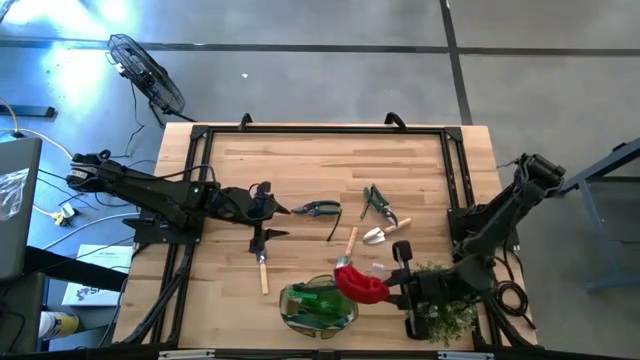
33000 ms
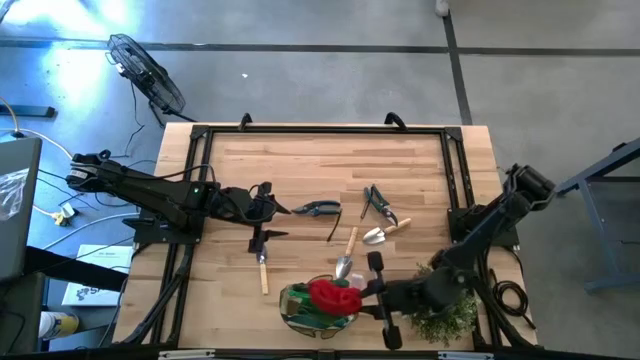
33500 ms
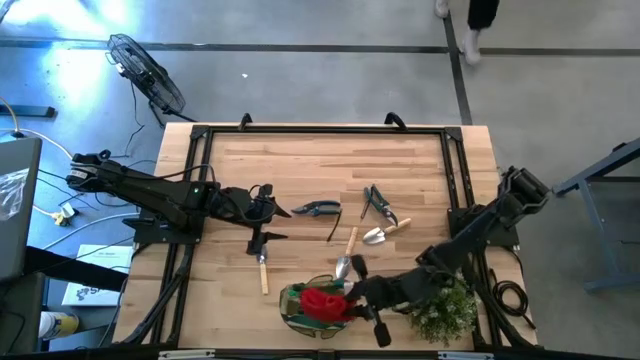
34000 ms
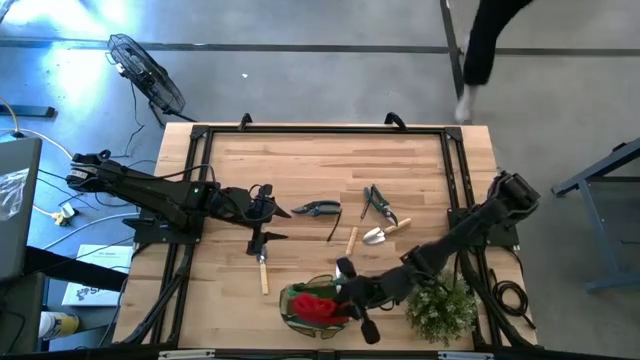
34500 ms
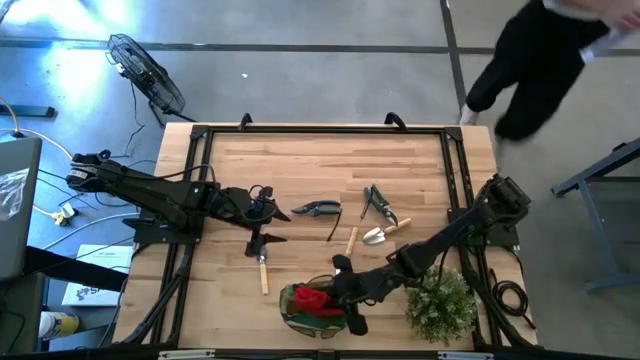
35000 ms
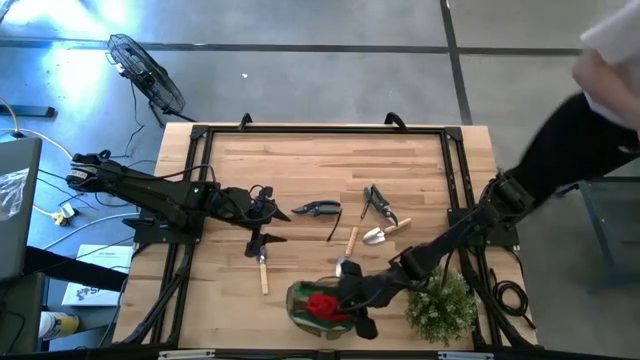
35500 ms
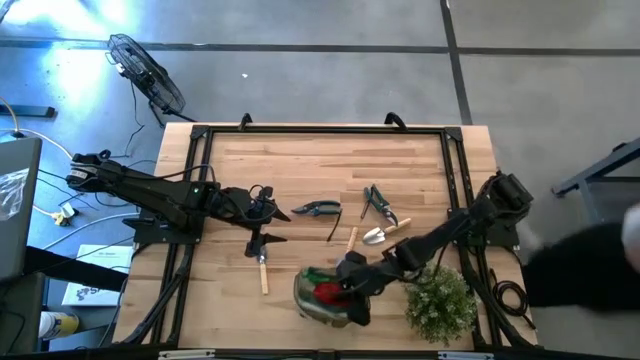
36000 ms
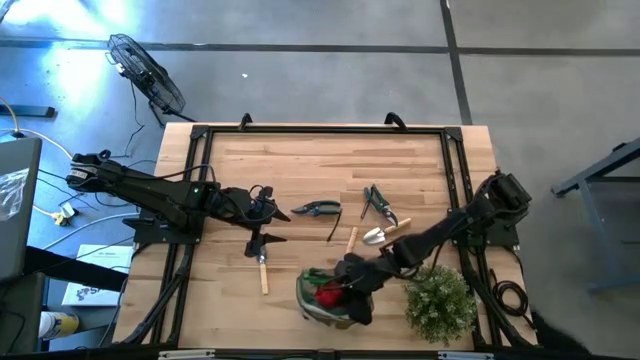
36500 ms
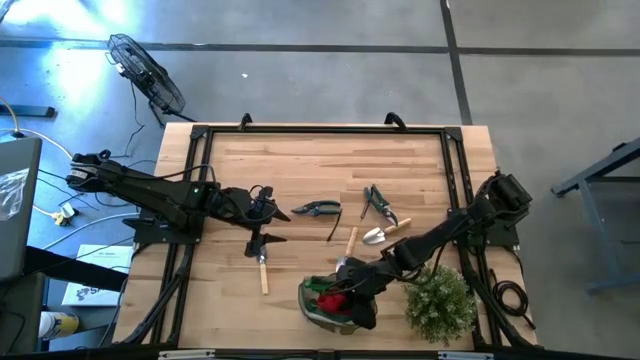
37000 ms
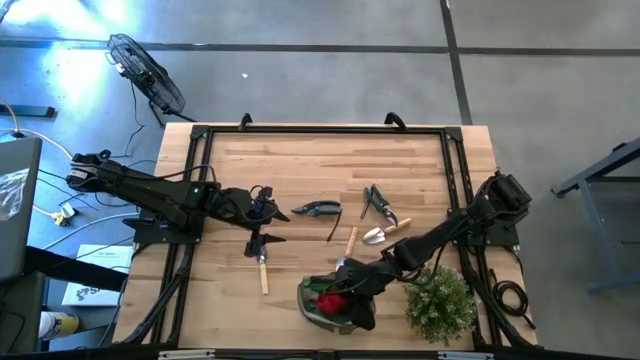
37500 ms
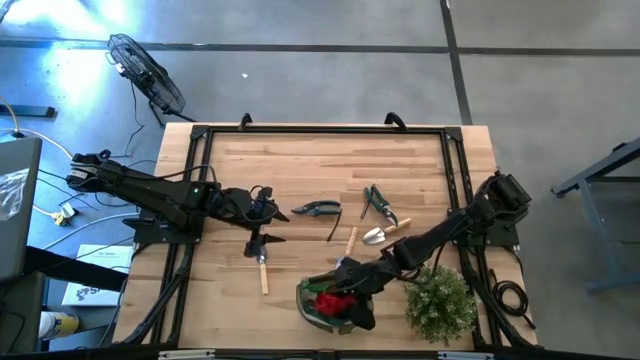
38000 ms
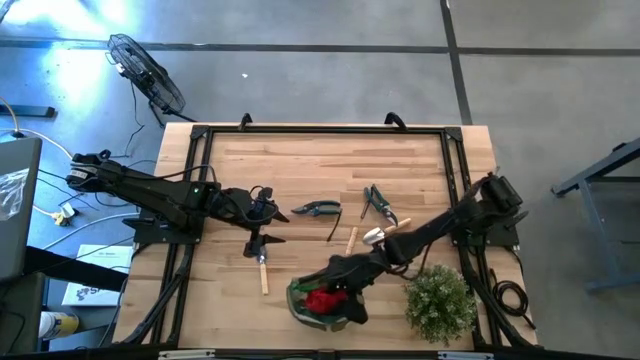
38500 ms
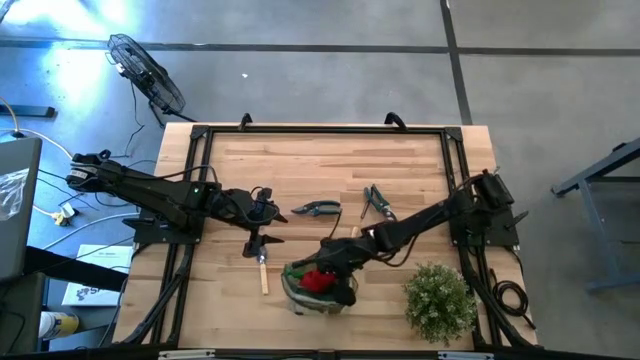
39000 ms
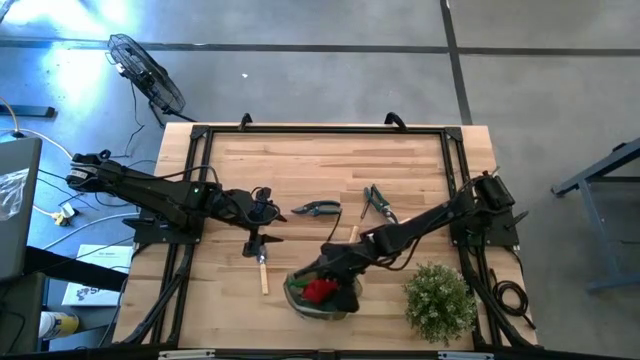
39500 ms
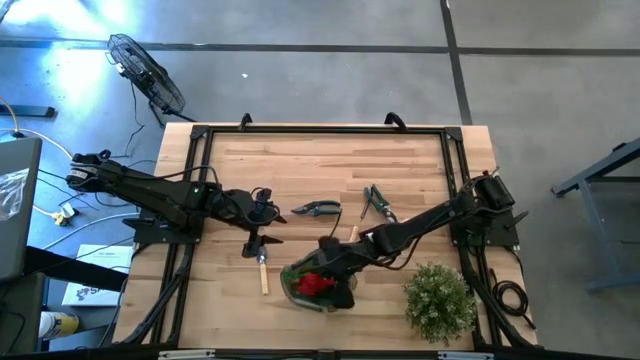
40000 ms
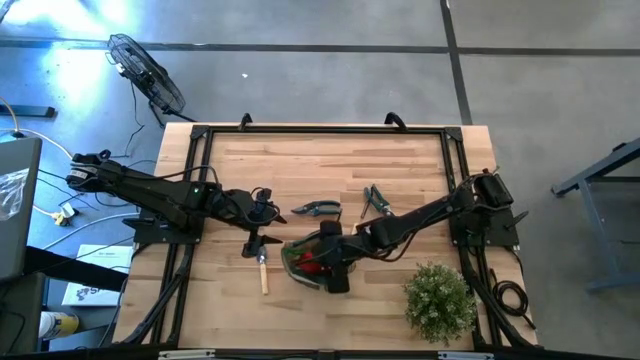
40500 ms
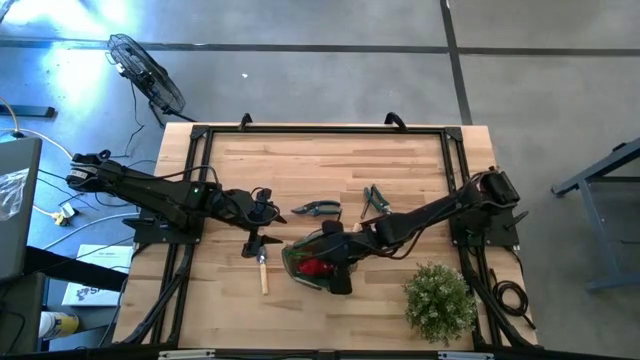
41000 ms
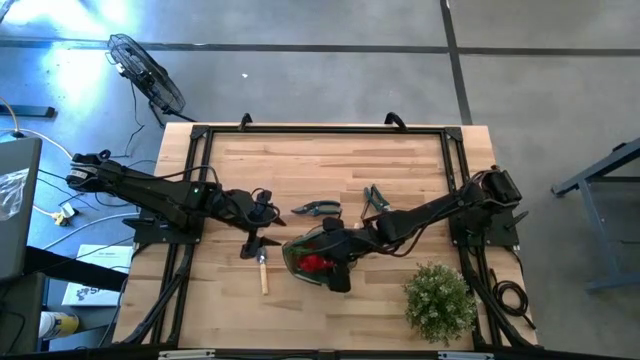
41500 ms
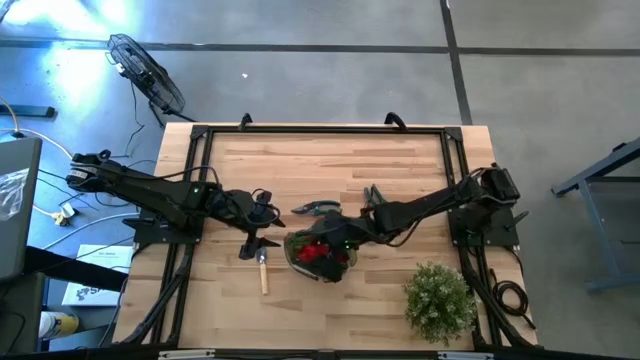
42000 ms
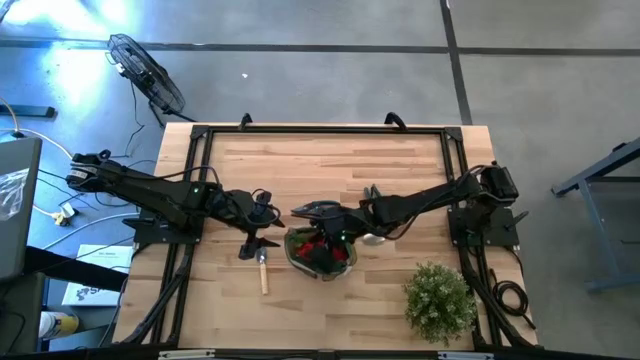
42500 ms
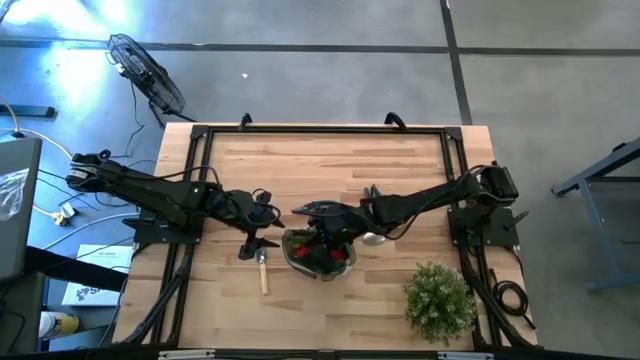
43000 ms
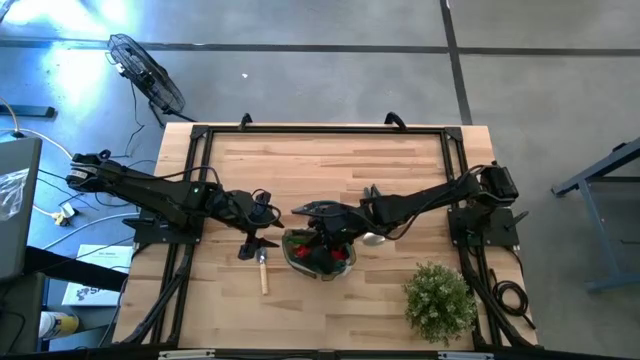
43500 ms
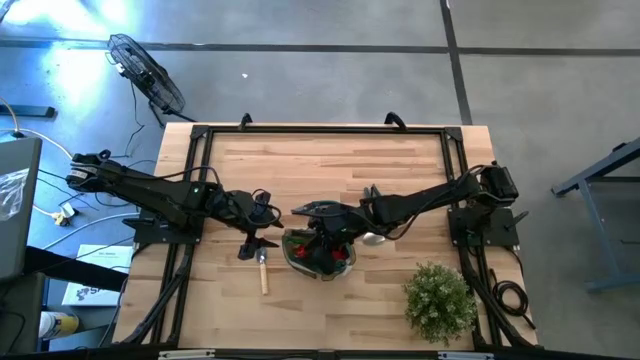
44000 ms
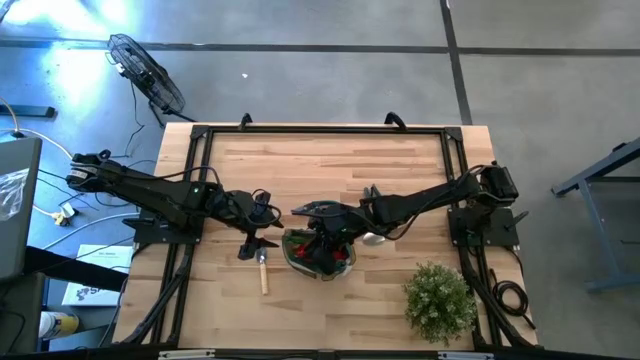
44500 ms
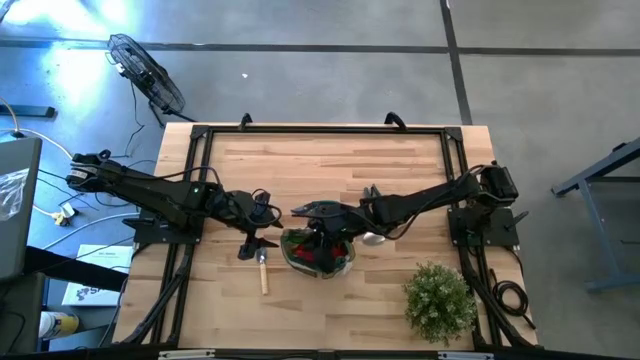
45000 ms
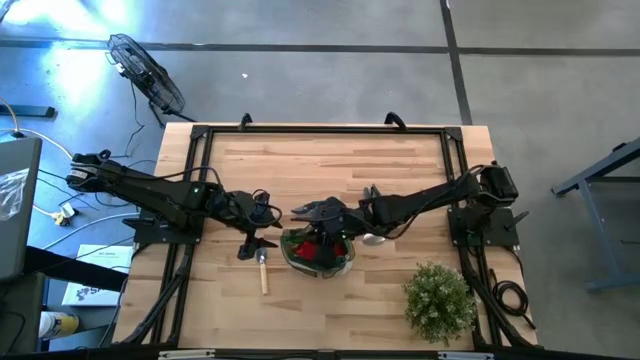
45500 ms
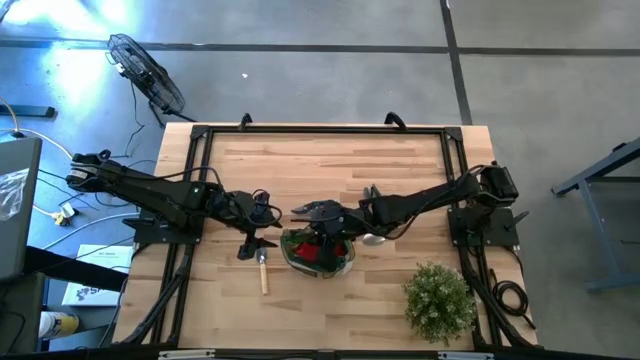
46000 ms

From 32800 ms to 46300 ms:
Task: Pick & Place Garden tools in Gardening bag
Put the red gloves into the green gardening bag

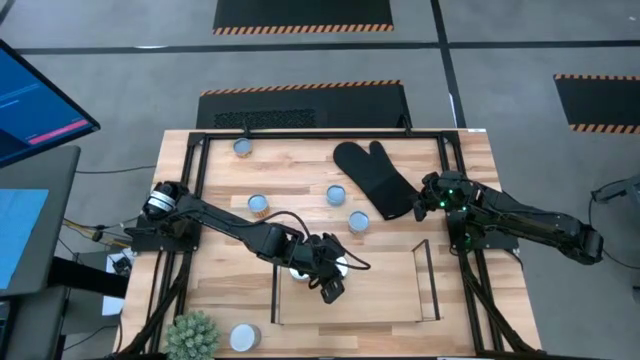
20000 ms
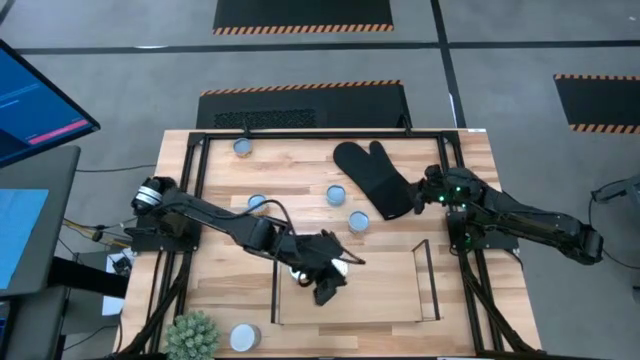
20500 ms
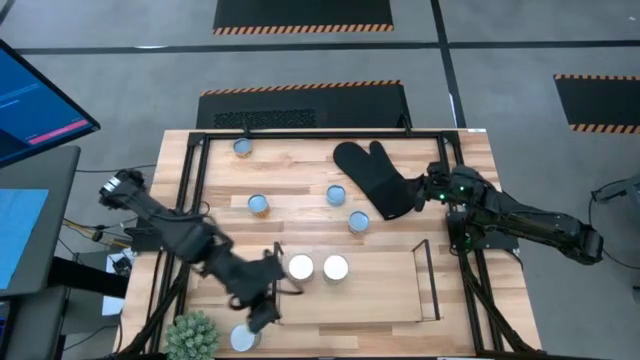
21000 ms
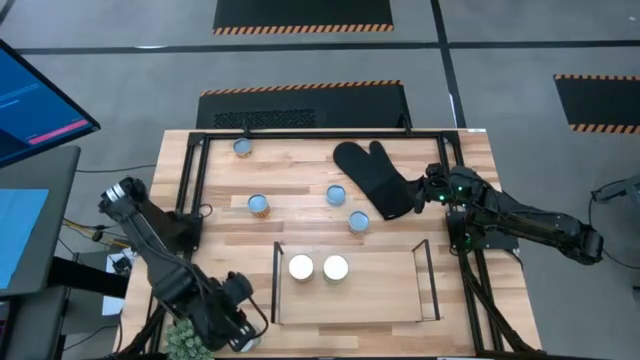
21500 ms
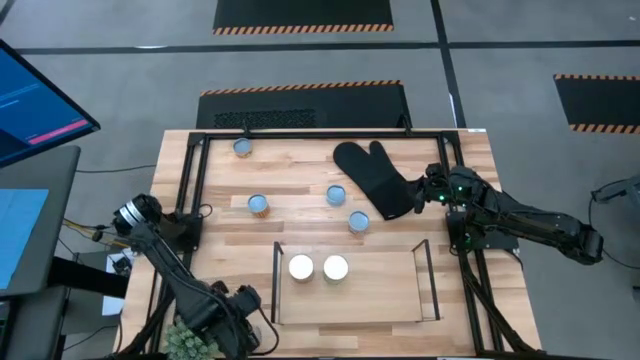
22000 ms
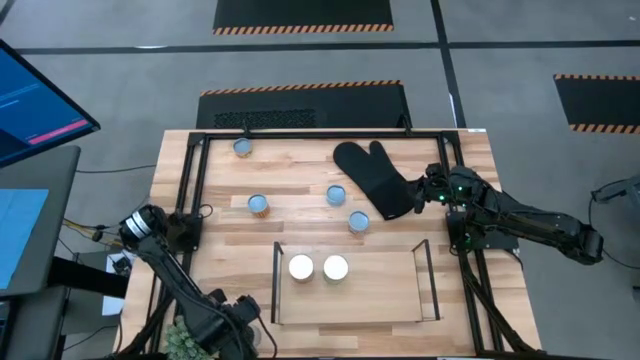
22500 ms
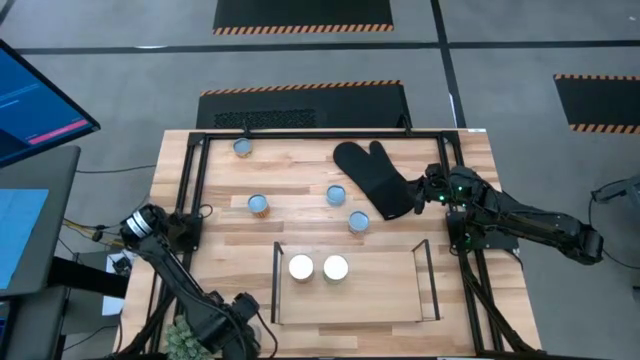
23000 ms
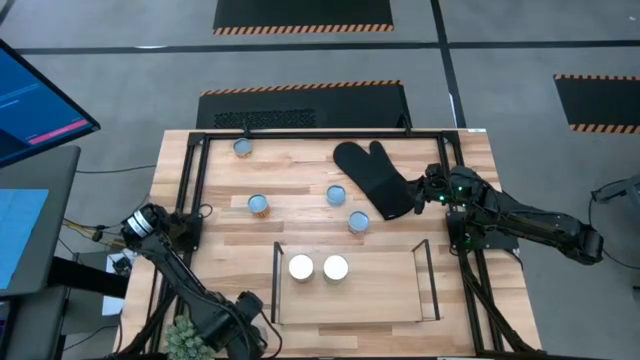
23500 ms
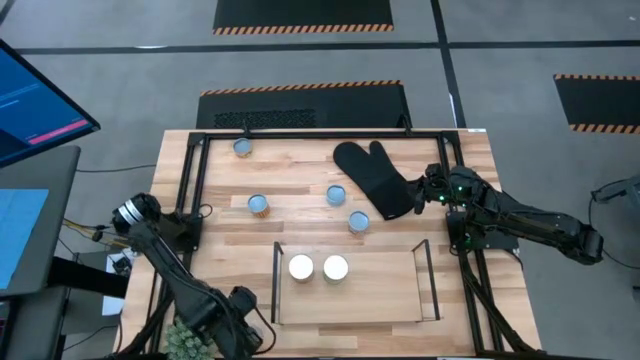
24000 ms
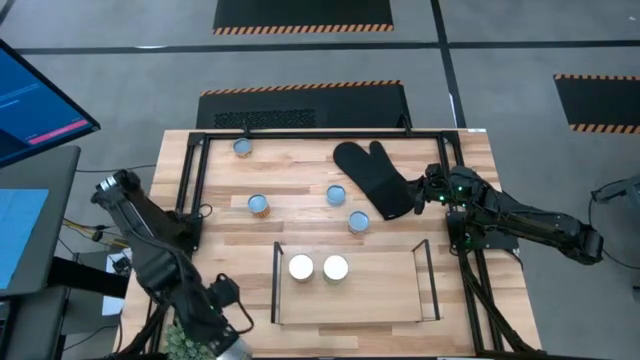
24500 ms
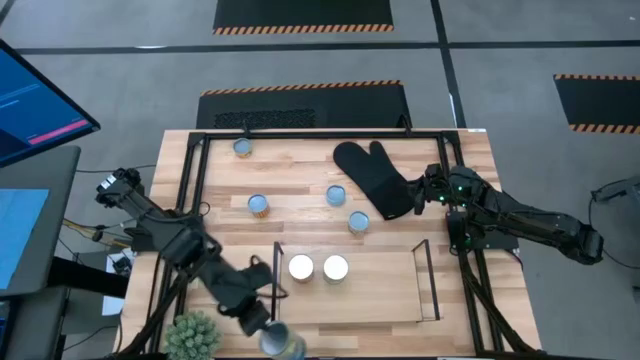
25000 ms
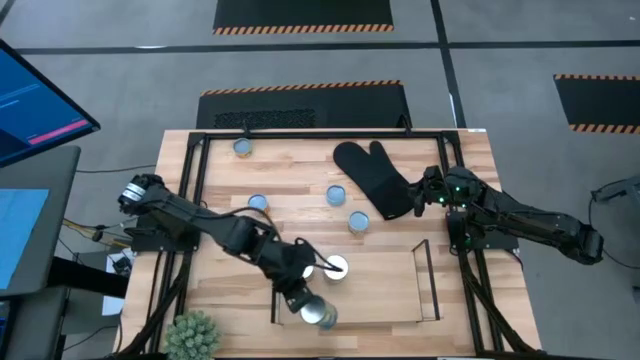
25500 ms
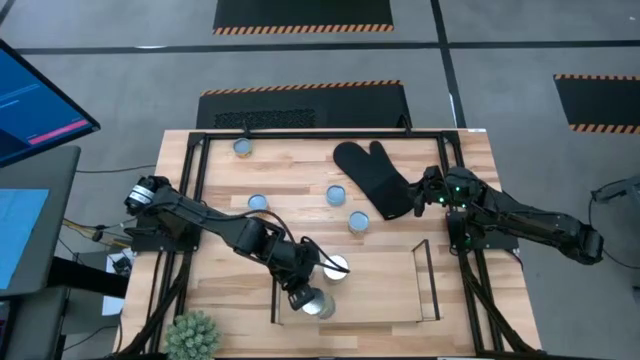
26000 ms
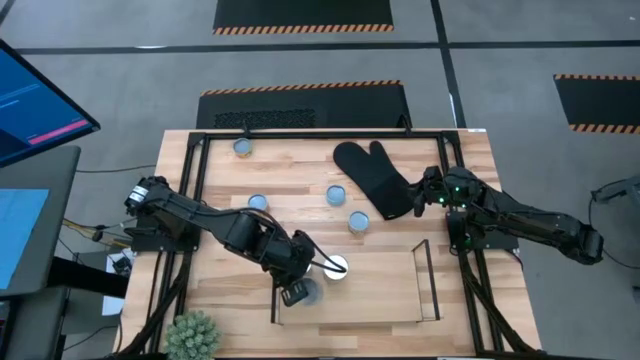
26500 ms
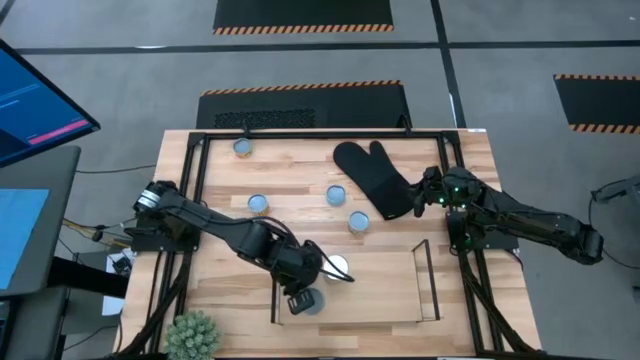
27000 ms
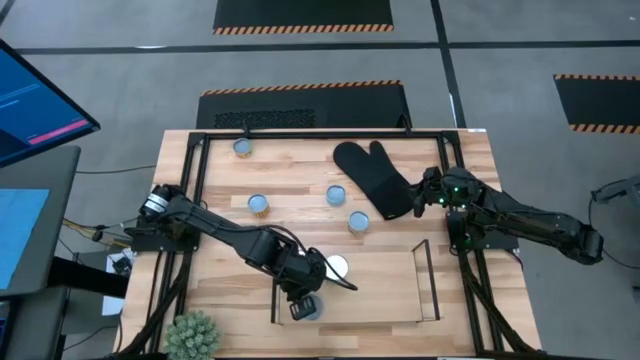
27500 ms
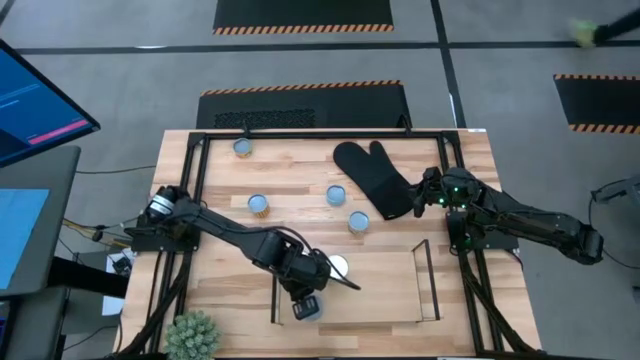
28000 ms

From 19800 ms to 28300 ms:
Task: Pick and place cans onto a shelf
Put the canned peas on the shelf
